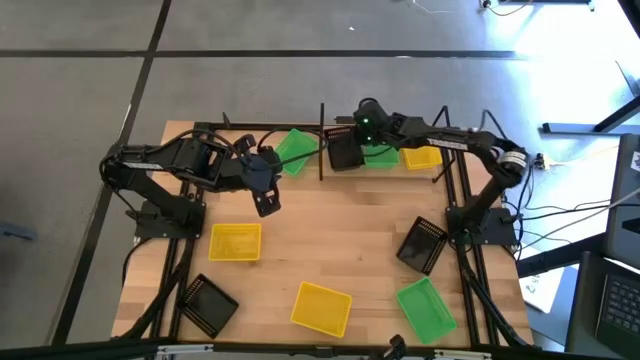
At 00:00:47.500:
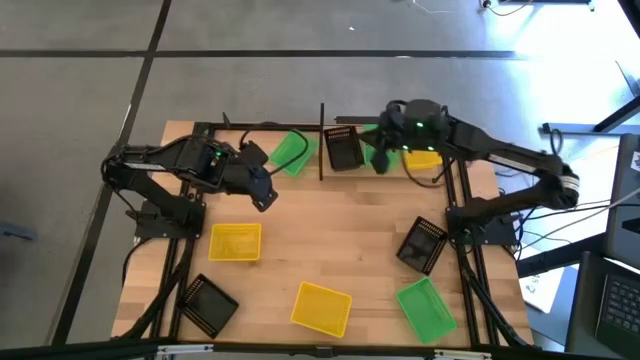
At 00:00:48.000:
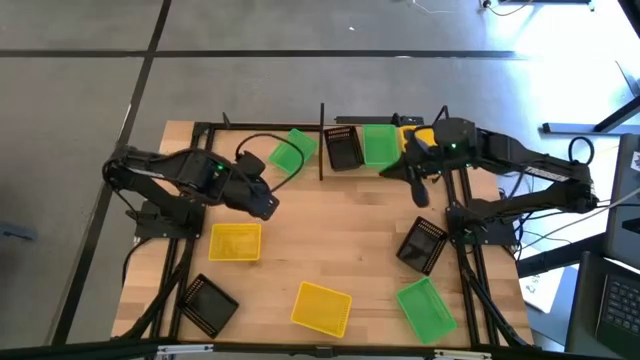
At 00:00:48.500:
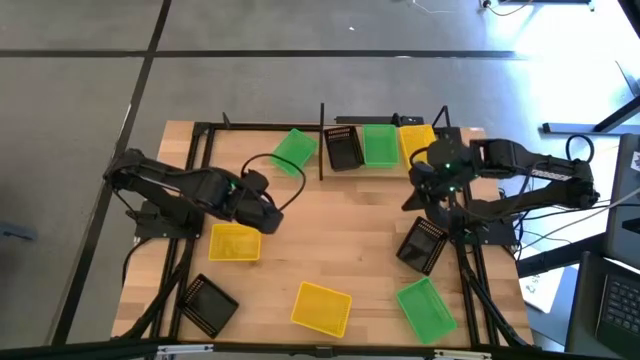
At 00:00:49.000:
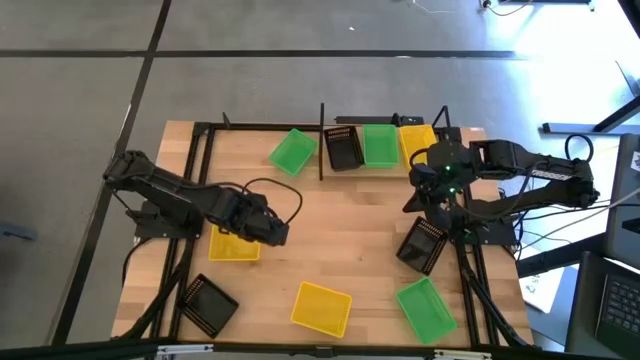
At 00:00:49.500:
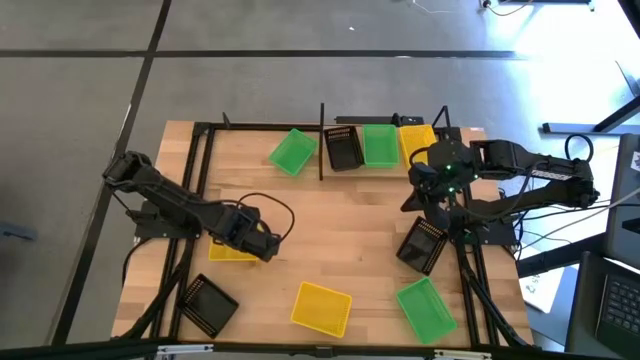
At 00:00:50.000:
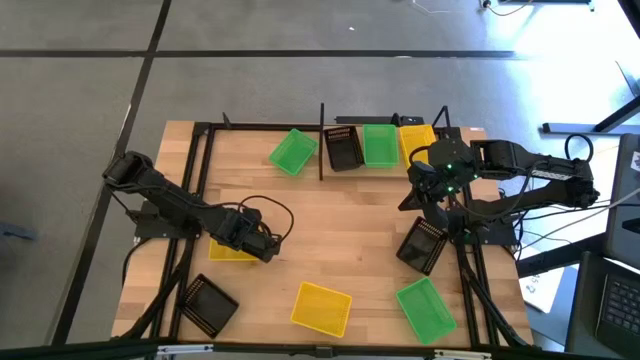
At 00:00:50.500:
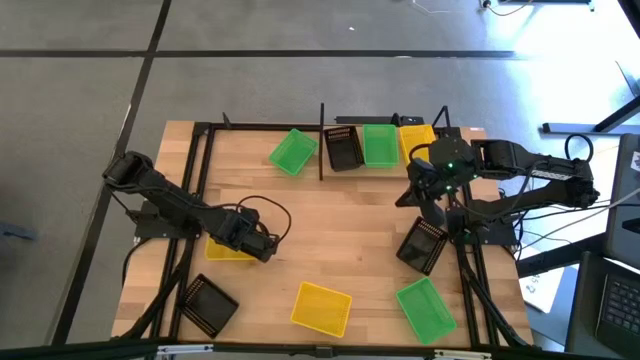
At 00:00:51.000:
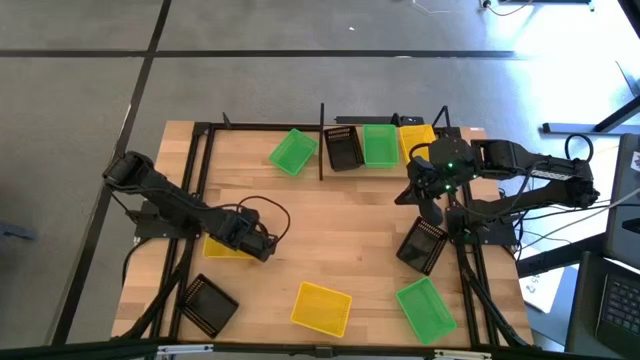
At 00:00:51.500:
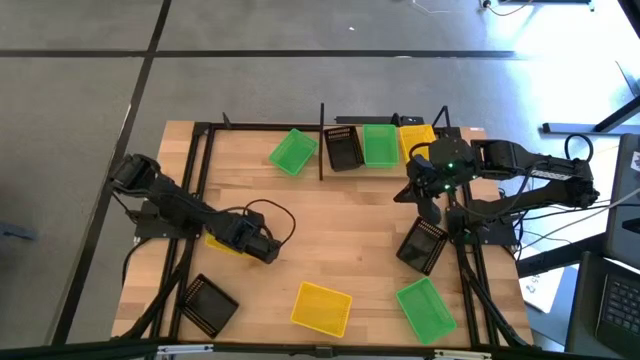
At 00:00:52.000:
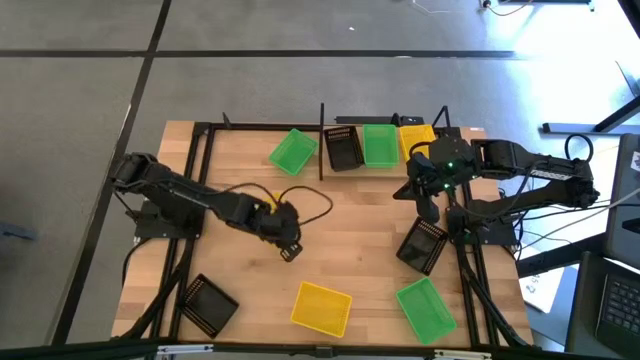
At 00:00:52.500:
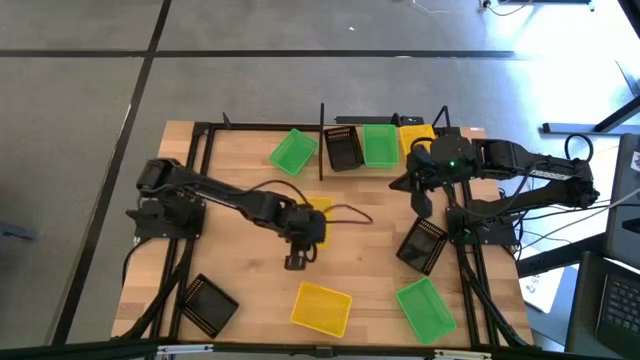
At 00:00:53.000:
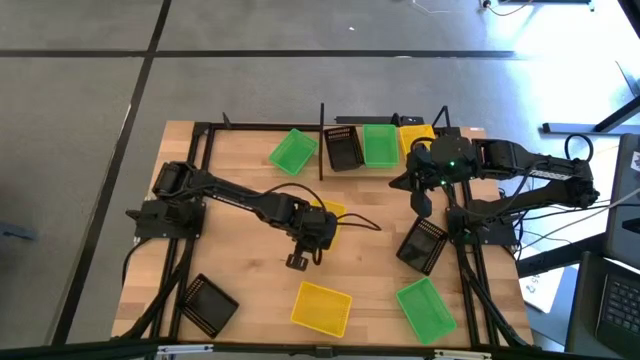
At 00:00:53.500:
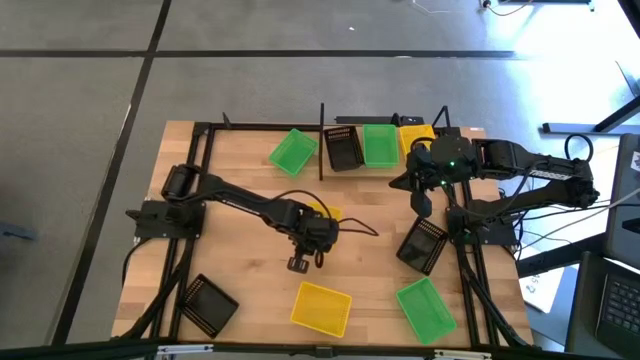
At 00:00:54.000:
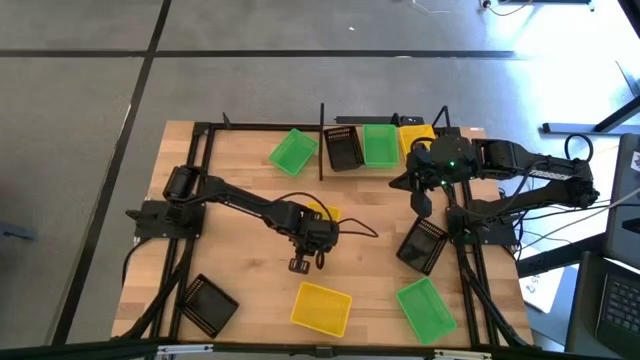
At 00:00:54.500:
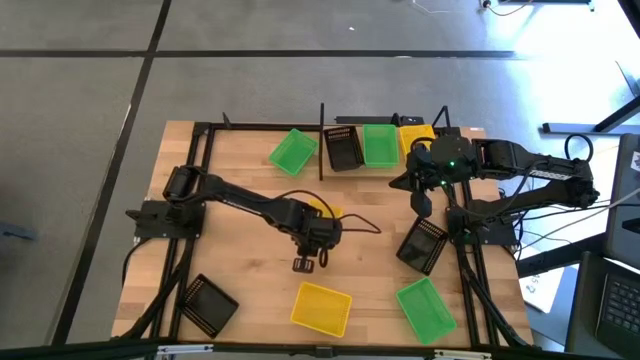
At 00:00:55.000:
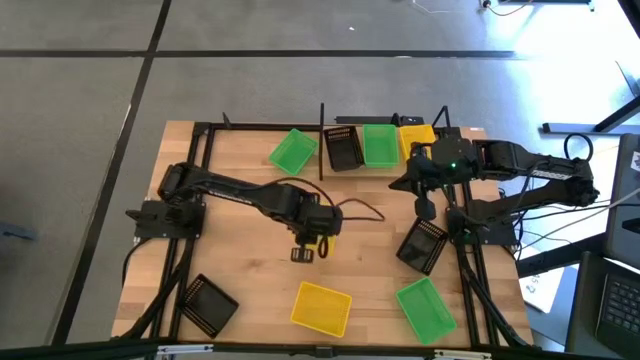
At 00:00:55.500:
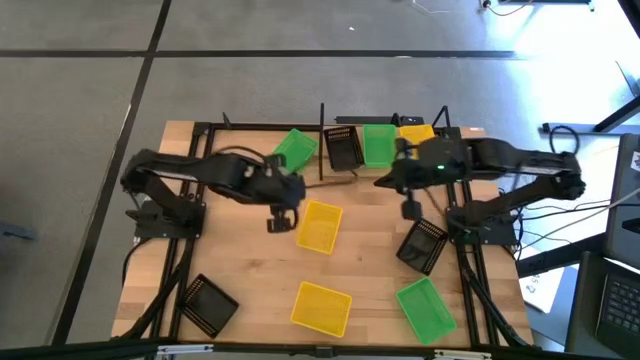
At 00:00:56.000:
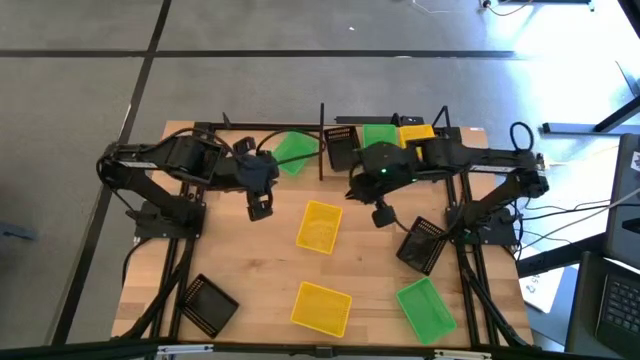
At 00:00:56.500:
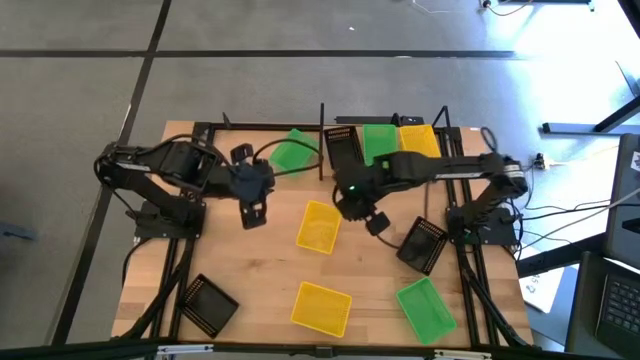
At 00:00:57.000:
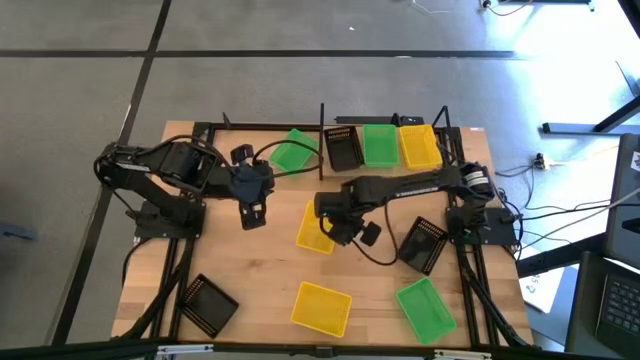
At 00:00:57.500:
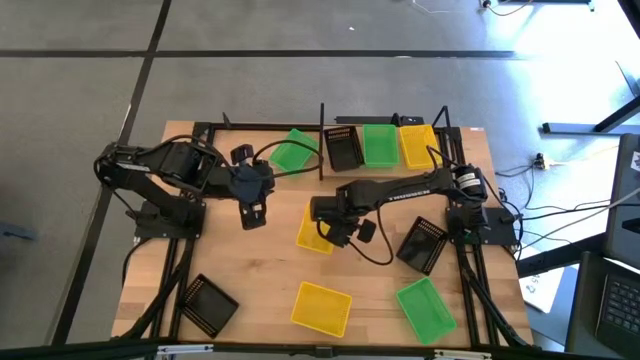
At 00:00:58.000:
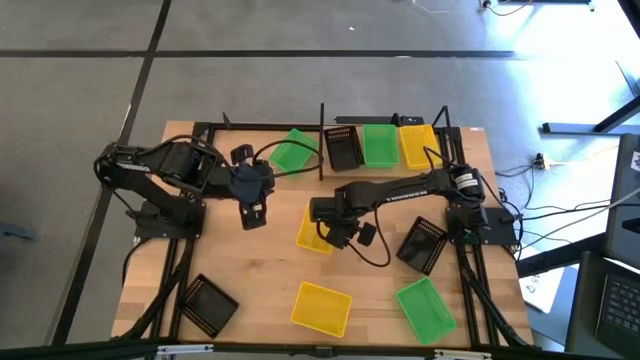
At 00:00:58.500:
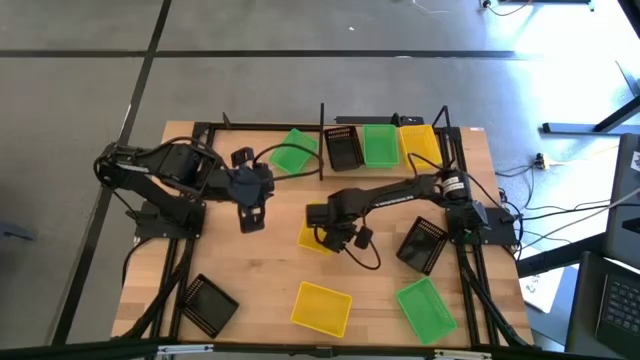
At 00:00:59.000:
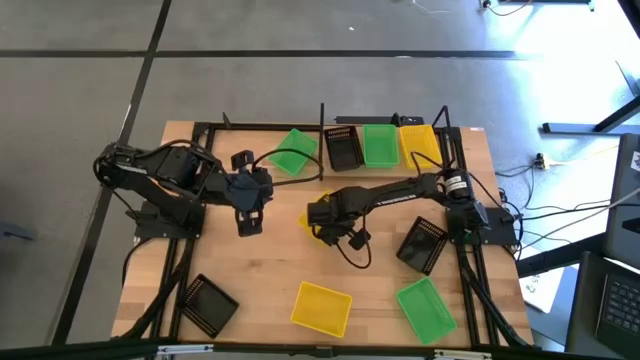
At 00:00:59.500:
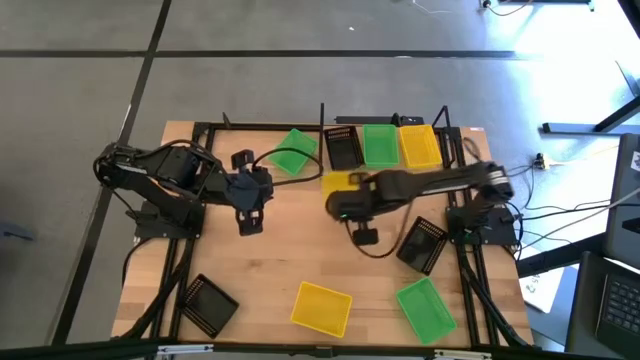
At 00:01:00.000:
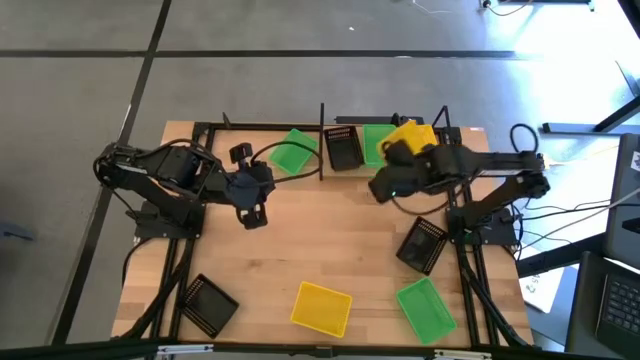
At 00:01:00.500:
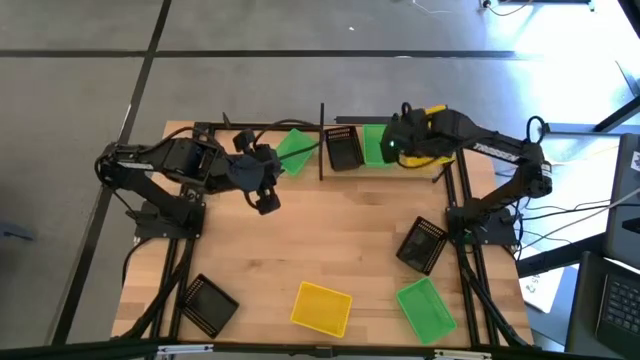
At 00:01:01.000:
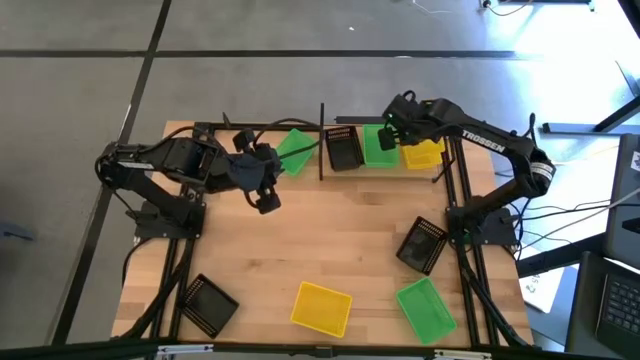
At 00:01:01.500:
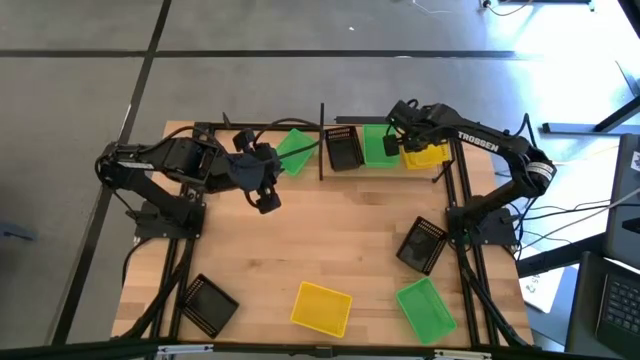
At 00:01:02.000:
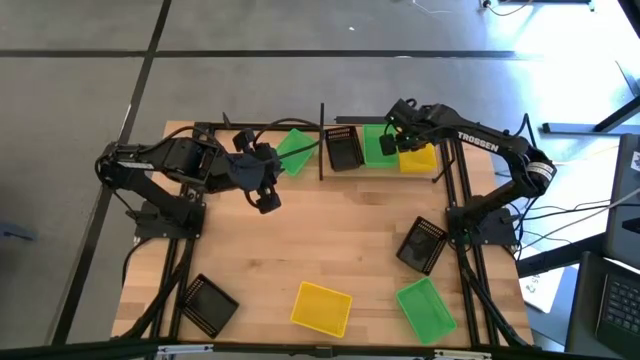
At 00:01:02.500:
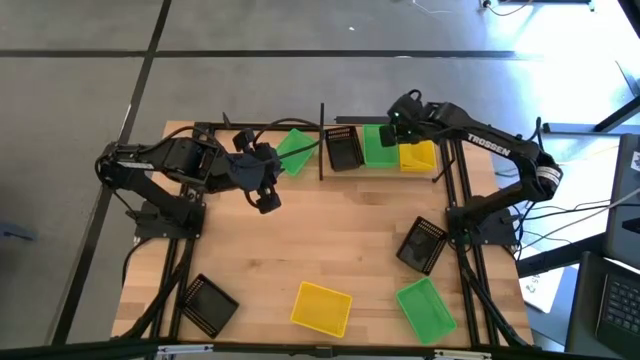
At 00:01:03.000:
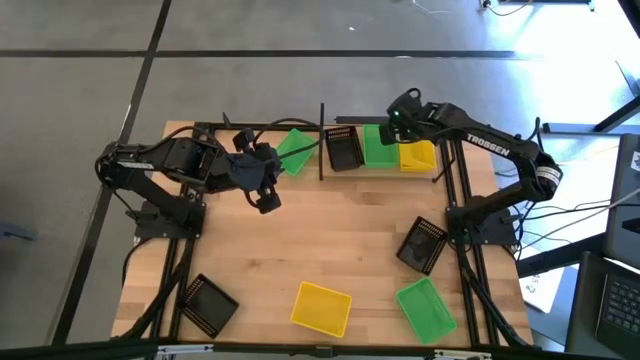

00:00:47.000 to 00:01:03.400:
Task: Stack baskets on shelf by color
Stack the top yellow basket on the yellow basket on the shelf

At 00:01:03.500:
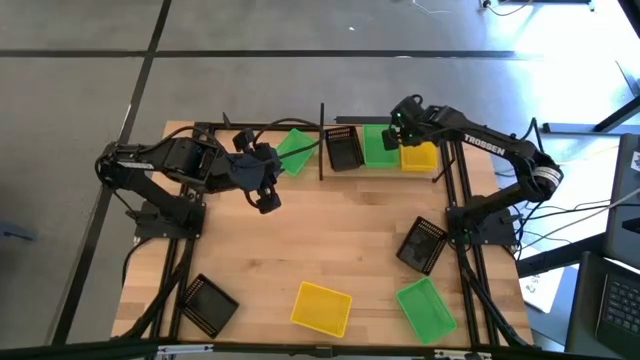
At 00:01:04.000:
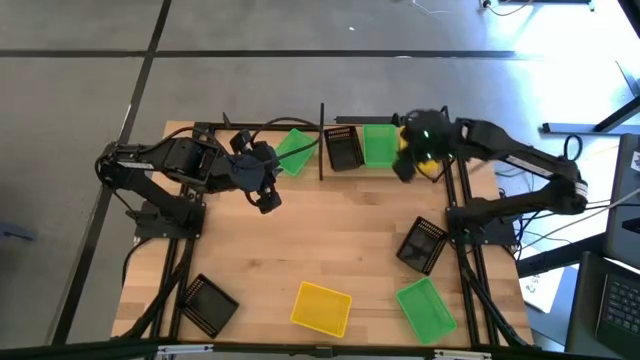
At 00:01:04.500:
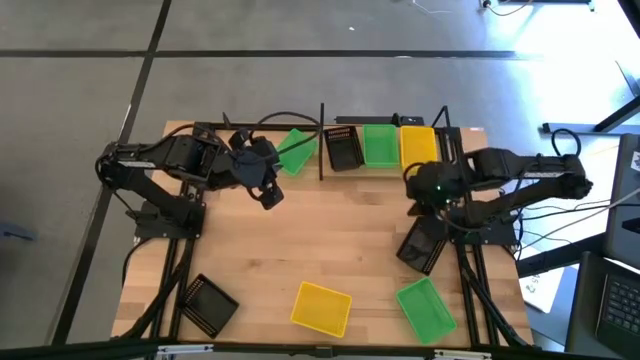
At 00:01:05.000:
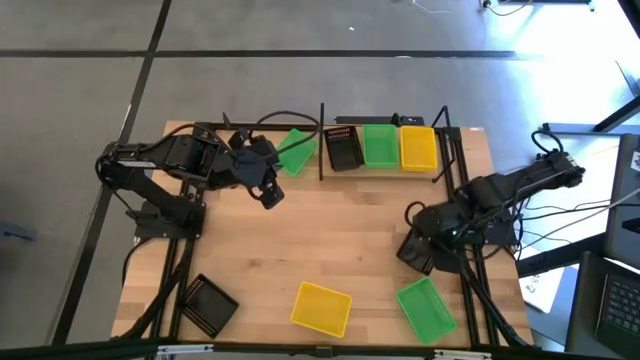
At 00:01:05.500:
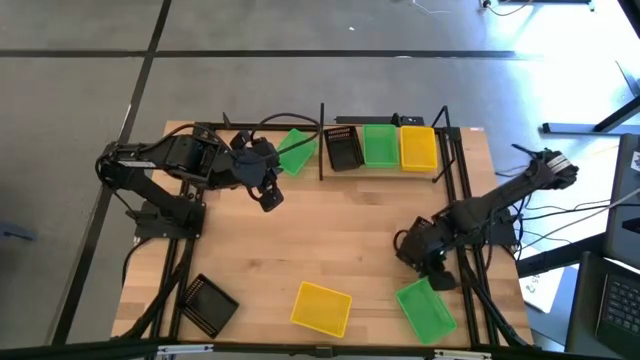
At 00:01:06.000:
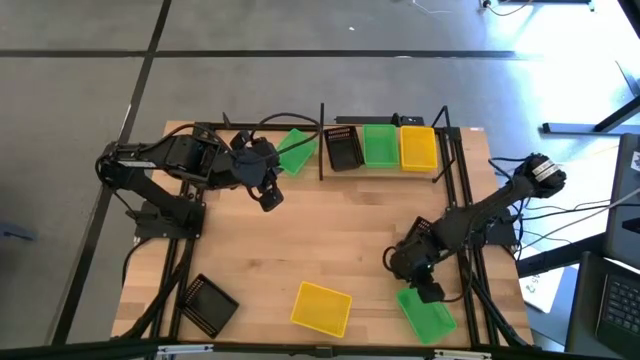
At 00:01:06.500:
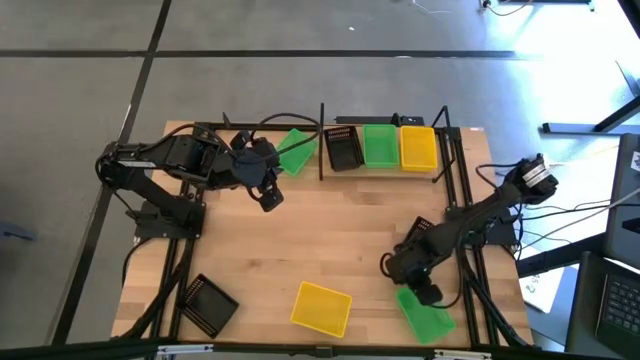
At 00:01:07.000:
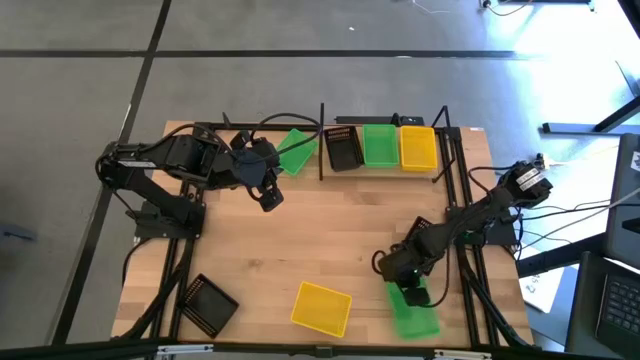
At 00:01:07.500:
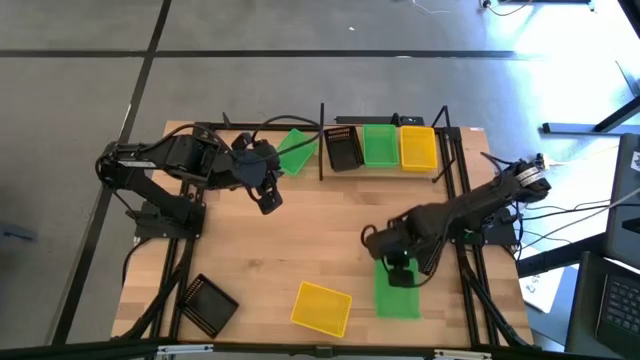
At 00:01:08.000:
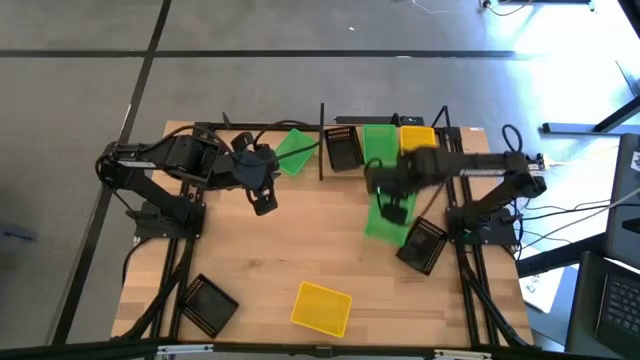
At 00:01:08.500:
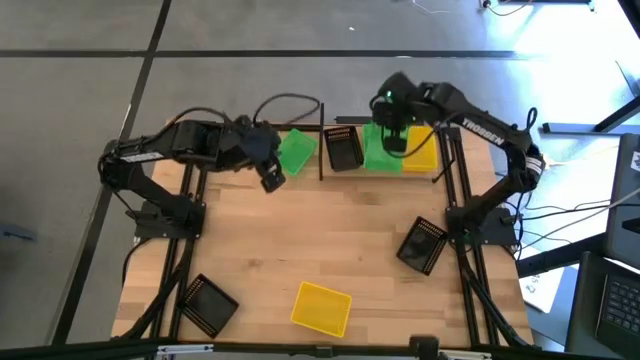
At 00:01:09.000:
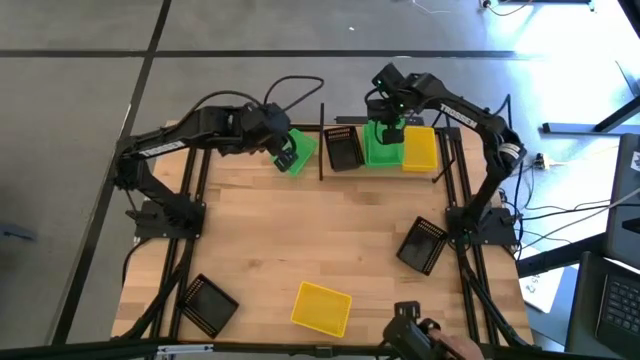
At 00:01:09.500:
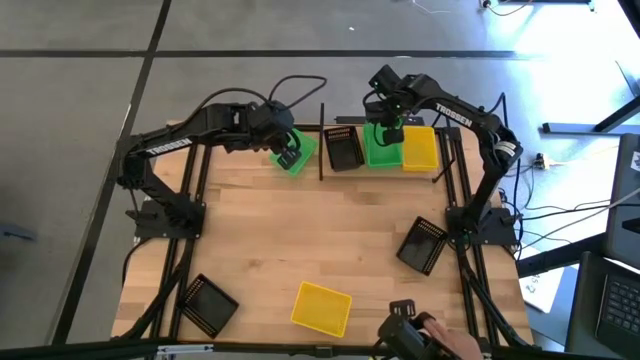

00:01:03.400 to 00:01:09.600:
Stack the bottom green basket on the green basket on the shelf
